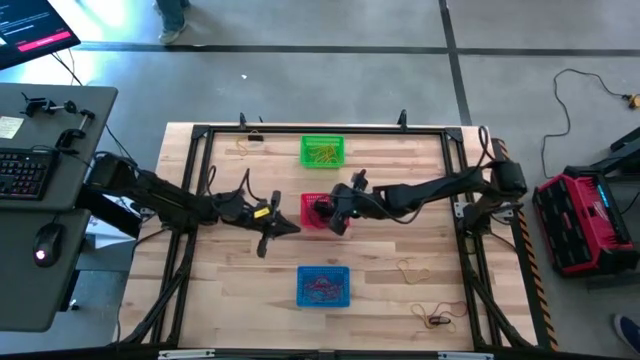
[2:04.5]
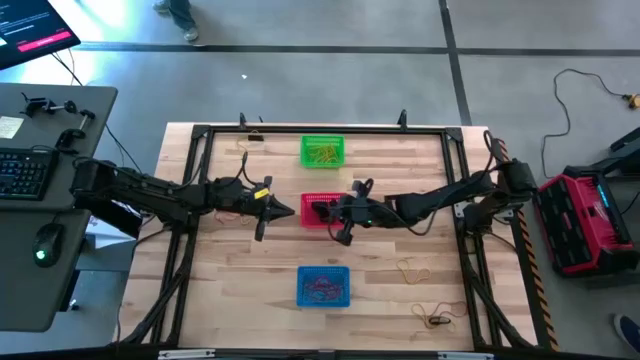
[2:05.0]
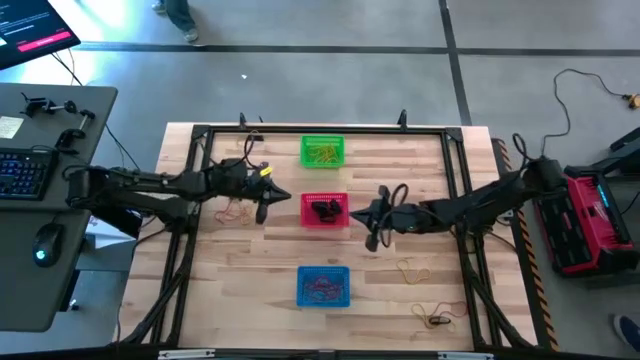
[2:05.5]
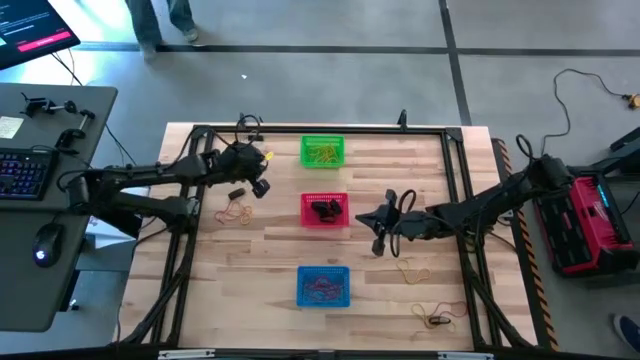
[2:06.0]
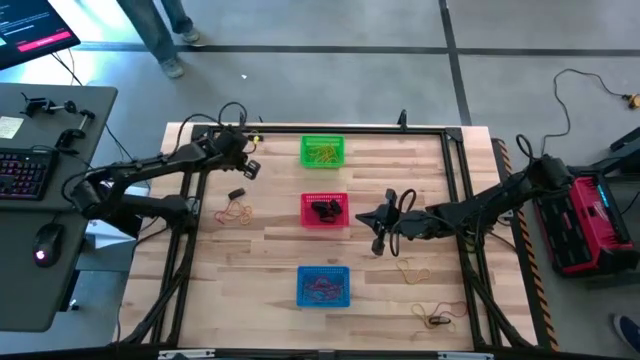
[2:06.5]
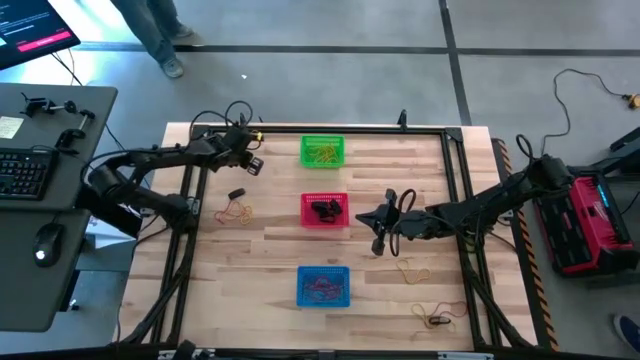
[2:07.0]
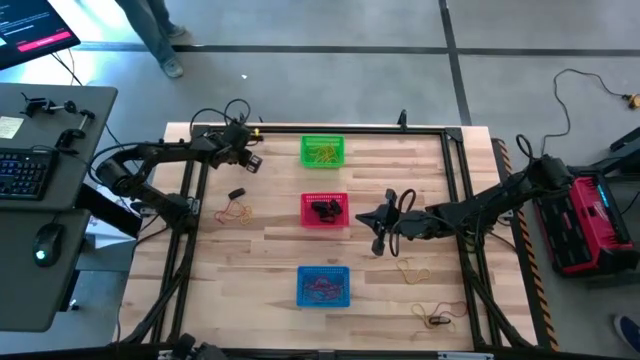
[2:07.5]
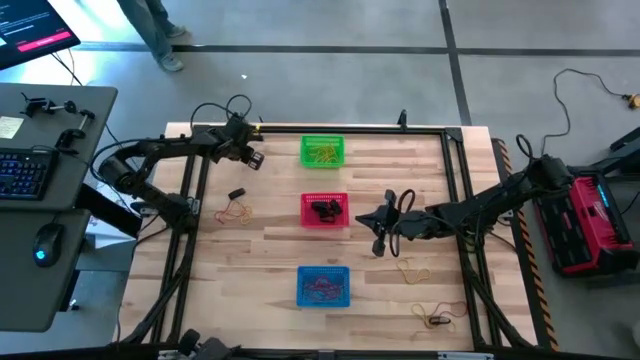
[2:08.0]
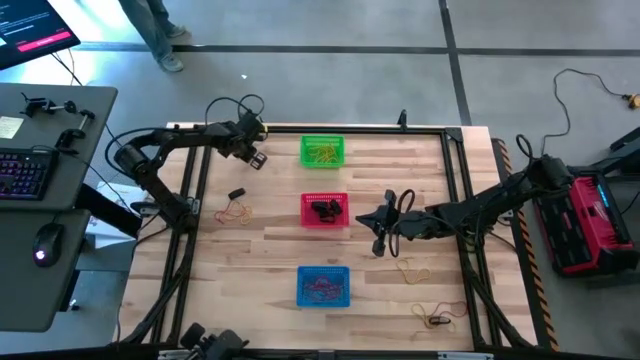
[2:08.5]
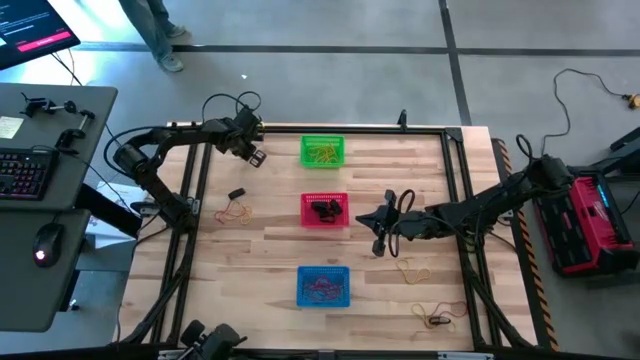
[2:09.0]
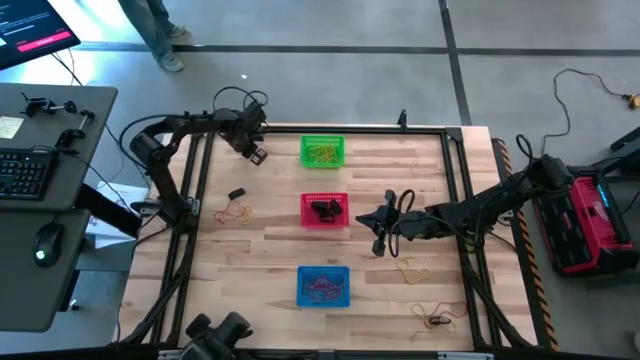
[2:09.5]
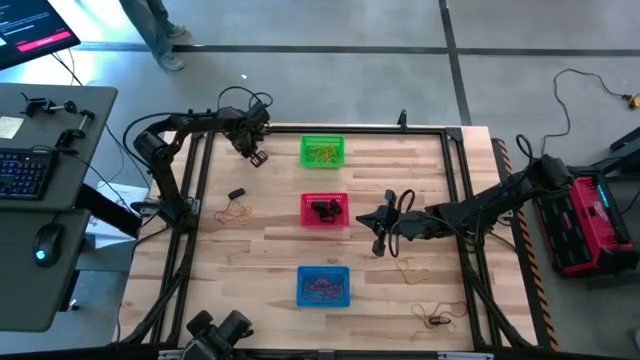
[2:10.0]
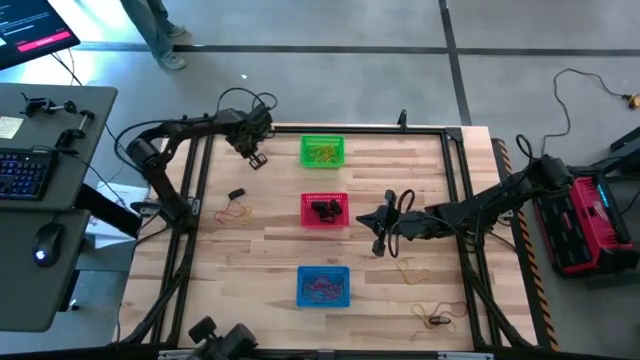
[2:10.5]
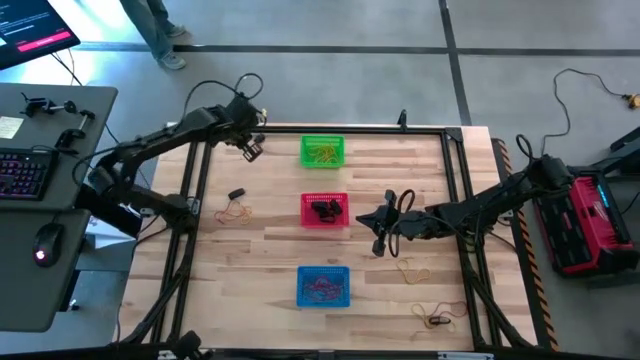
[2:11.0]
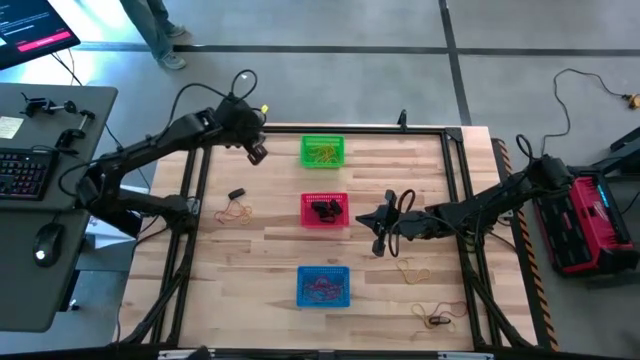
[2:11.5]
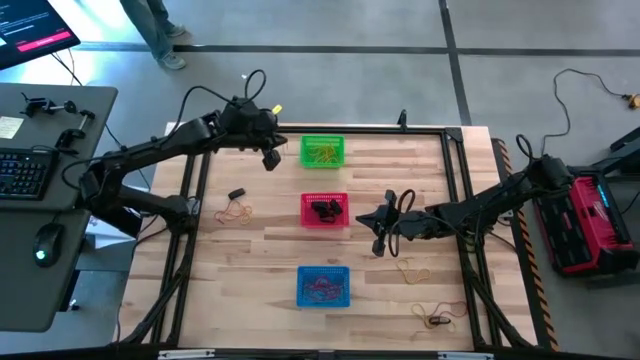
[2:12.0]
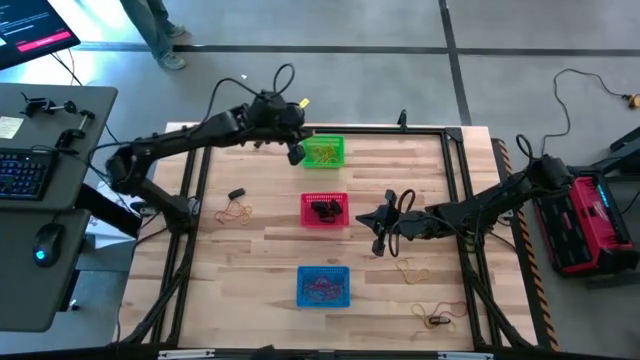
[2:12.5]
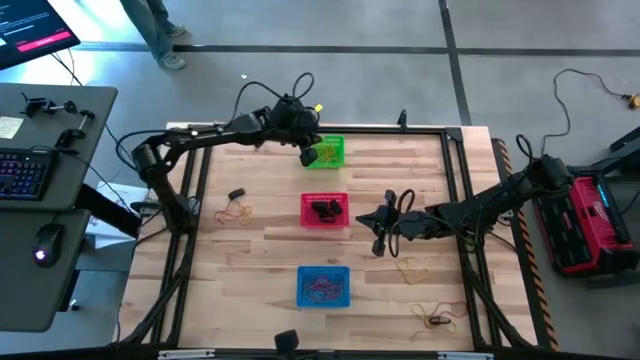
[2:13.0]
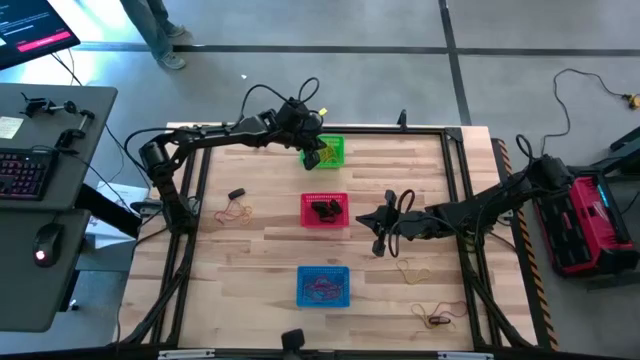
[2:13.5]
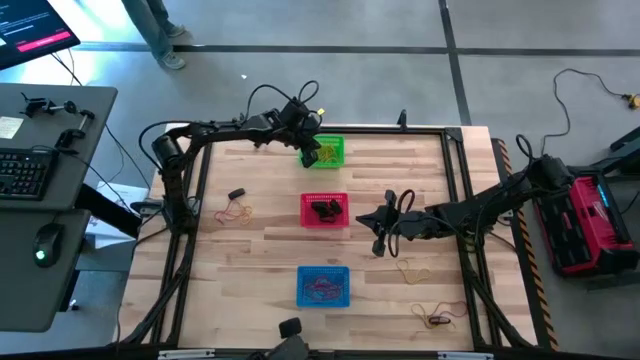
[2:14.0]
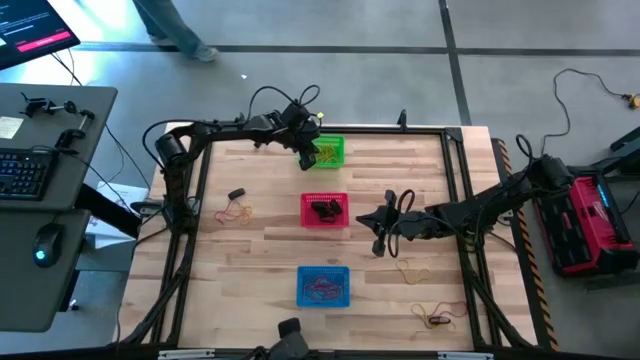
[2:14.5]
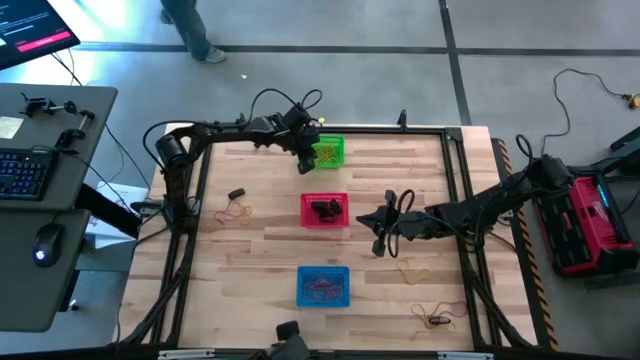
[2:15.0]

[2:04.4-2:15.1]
Task: Sort rubber bands into baskets
Put the yellow rubber band into the green bin

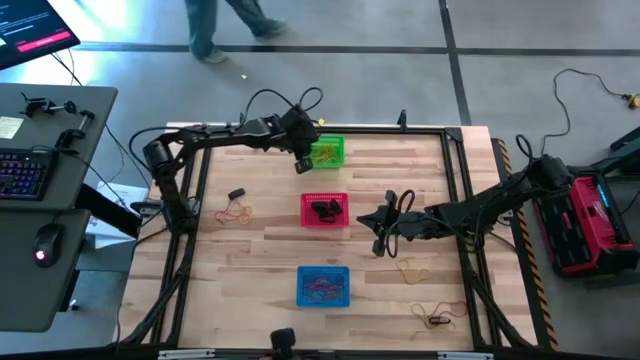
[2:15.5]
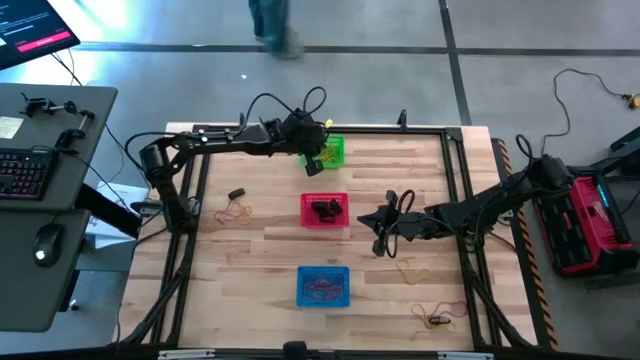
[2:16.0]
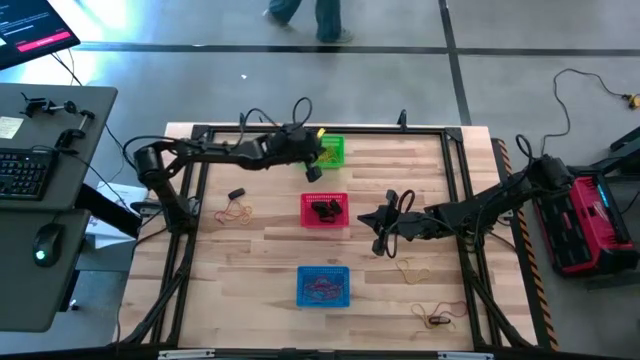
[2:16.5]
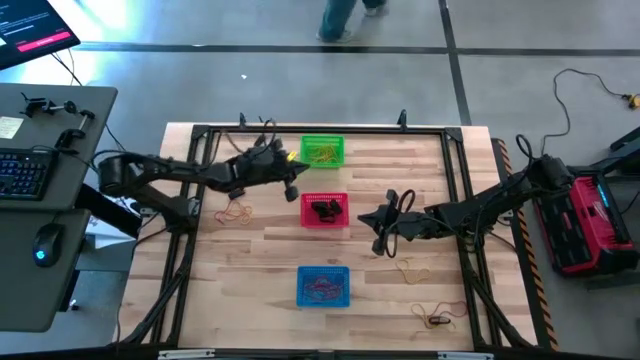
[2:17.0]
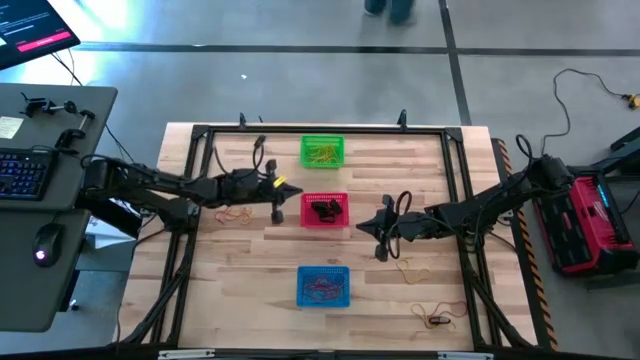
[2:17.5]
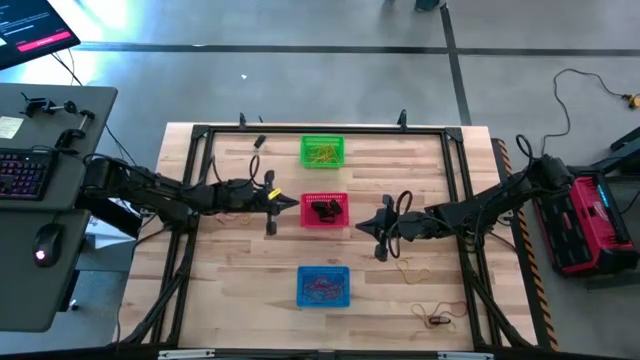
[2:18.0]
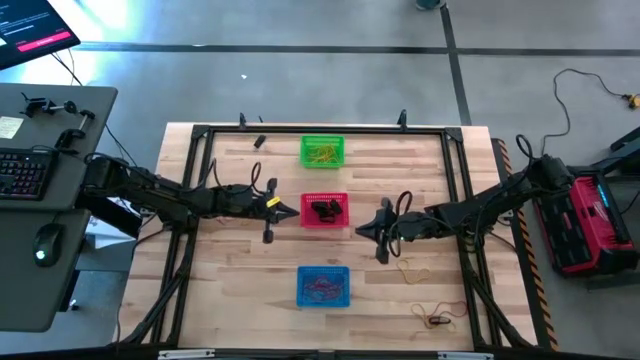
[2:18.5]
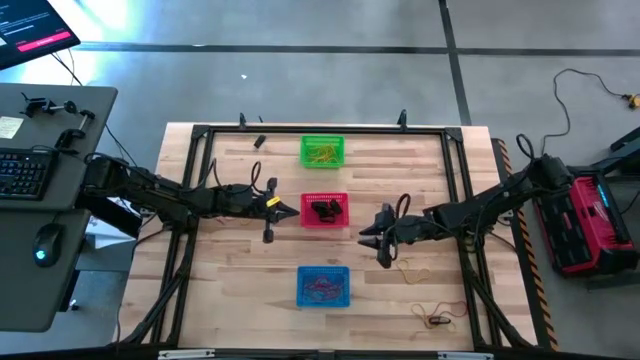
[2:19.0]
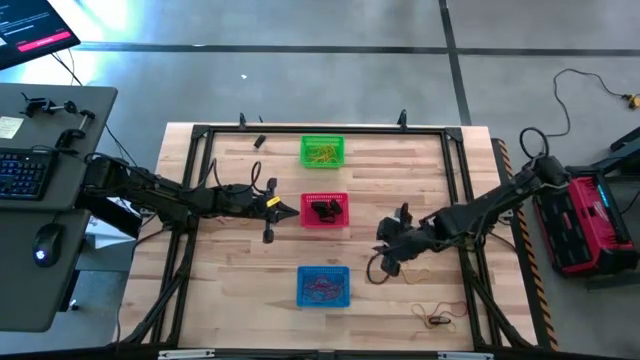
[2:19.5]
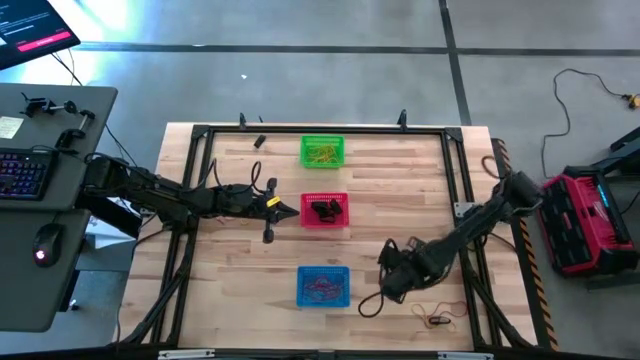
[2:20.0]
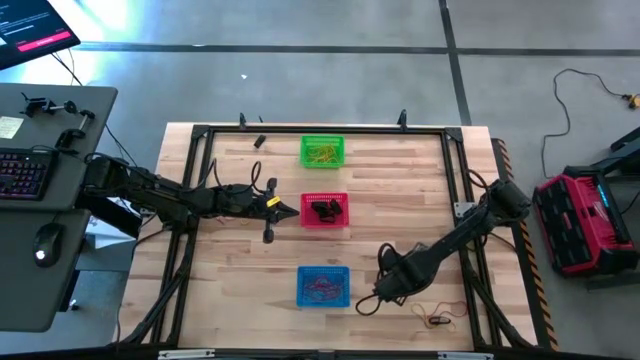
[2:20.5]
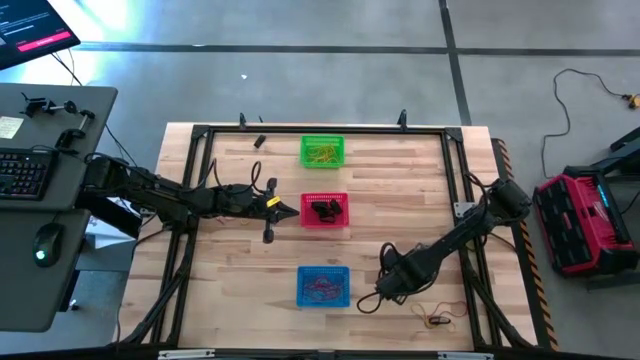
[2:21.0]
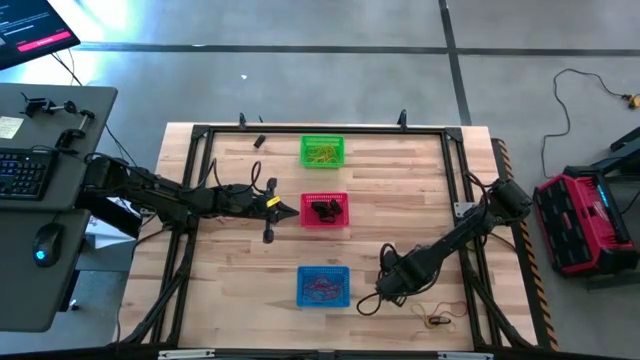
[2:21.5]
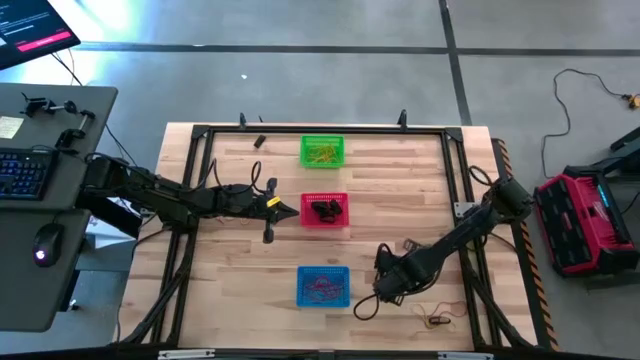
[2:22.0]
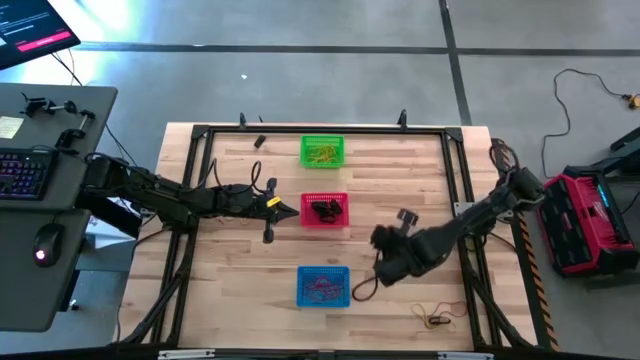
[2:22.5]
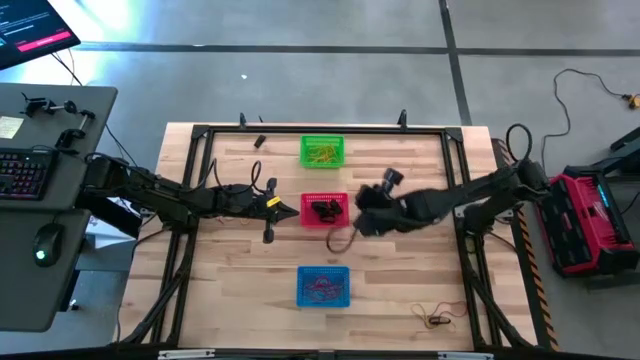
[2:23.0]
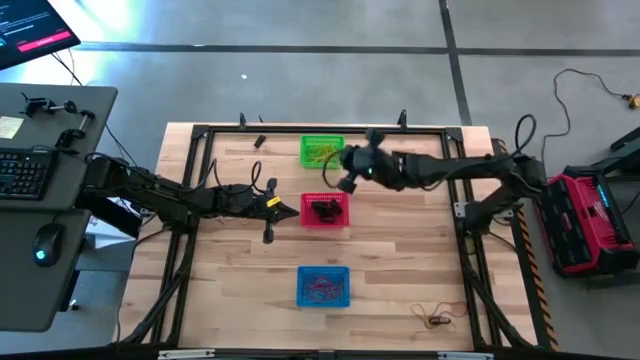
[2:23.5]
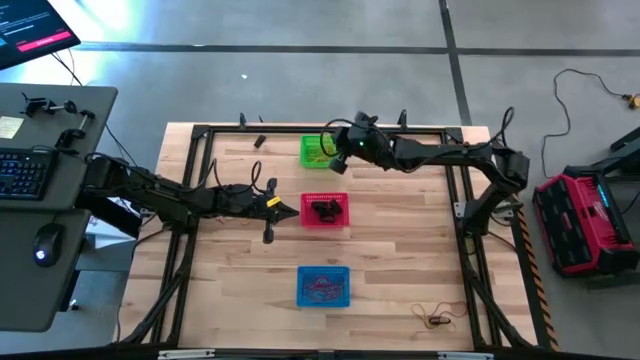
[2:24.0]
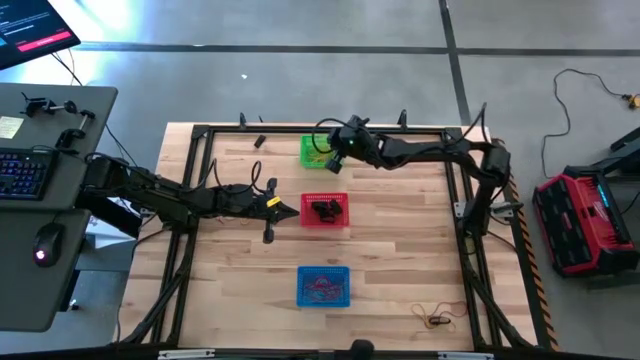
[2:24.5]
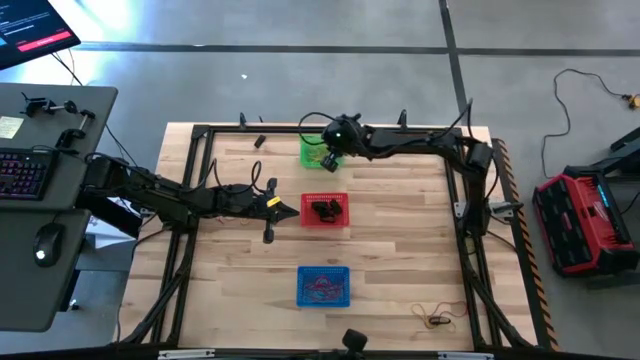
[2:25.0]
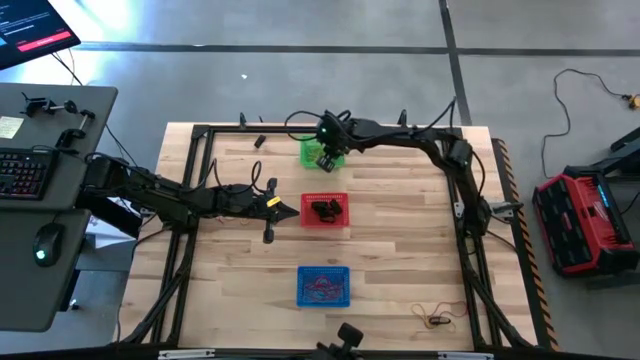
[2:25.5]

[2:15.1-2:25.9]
Put the yellow rubber band into the green bin
